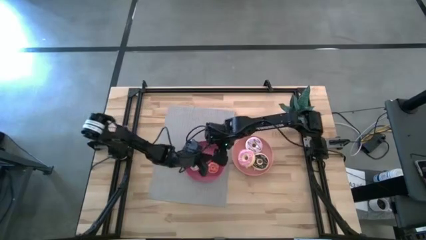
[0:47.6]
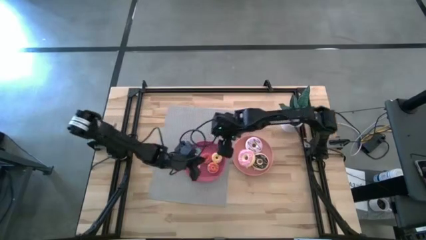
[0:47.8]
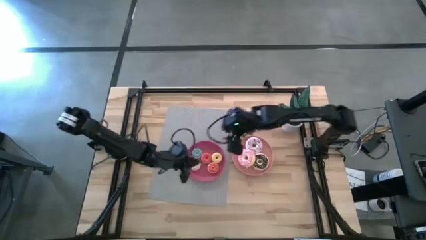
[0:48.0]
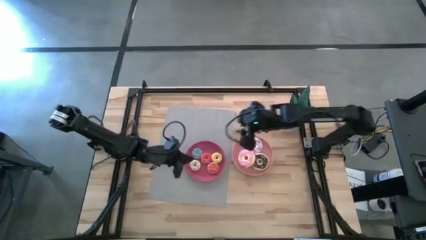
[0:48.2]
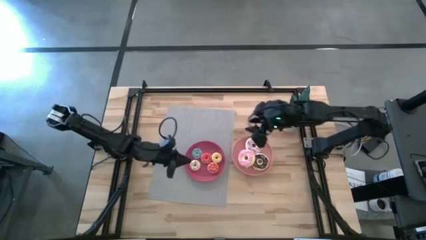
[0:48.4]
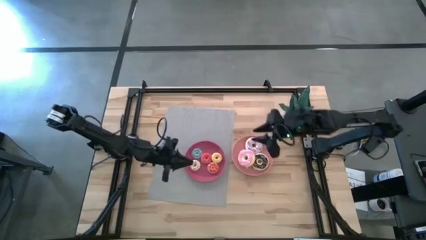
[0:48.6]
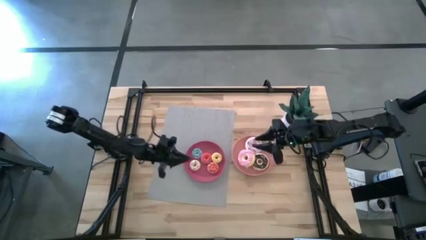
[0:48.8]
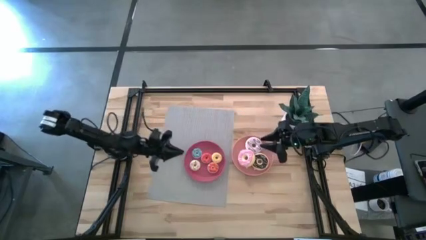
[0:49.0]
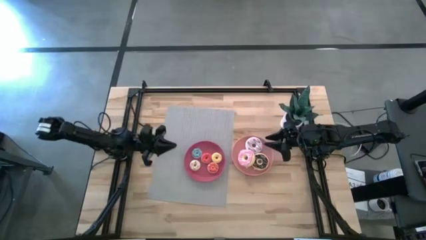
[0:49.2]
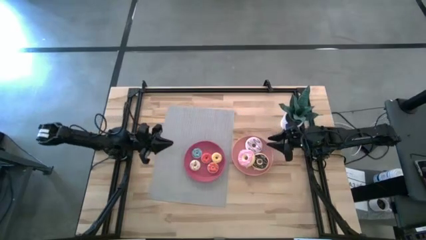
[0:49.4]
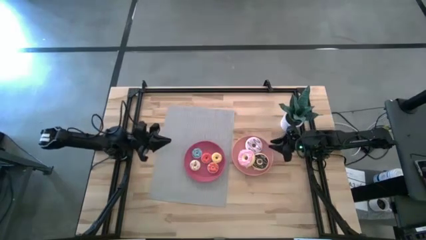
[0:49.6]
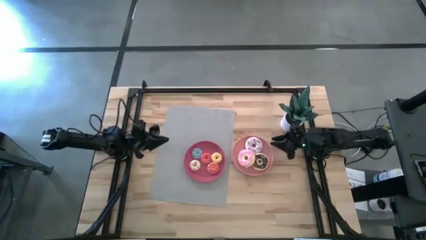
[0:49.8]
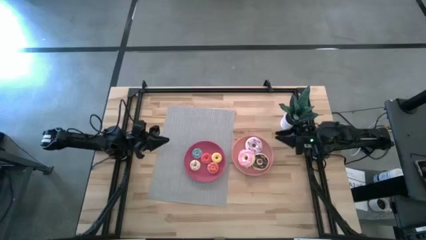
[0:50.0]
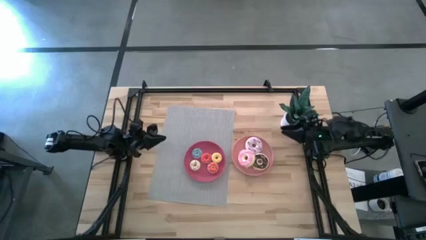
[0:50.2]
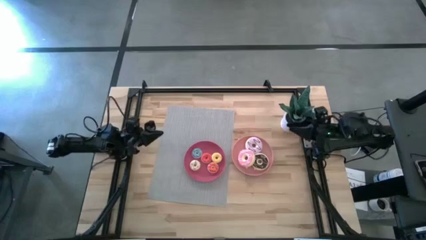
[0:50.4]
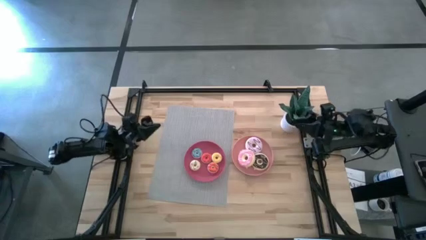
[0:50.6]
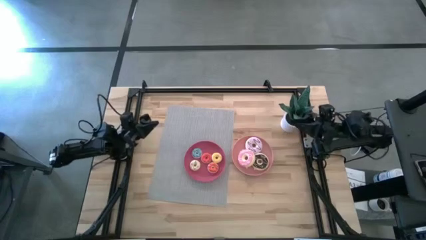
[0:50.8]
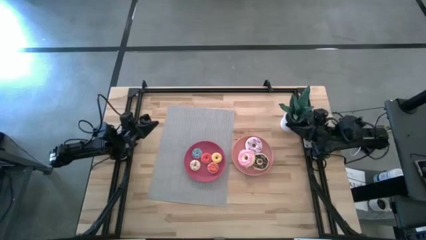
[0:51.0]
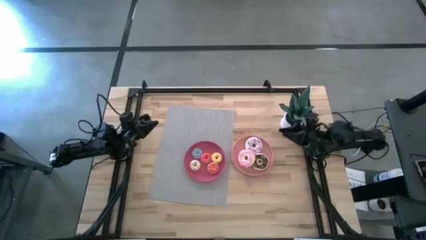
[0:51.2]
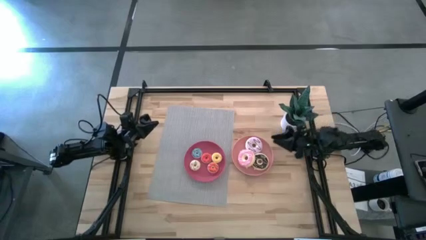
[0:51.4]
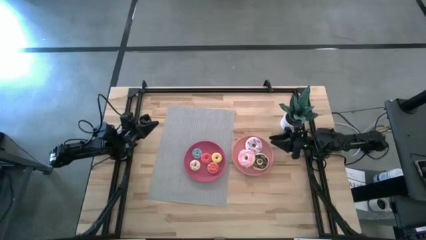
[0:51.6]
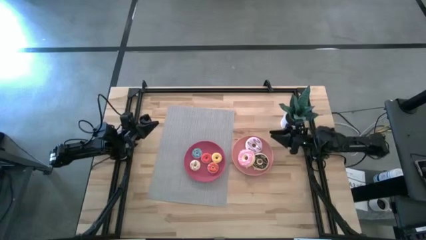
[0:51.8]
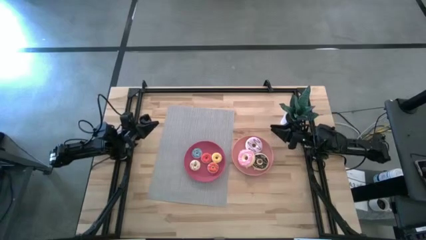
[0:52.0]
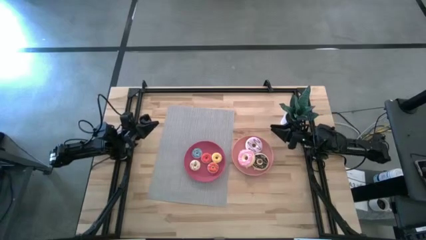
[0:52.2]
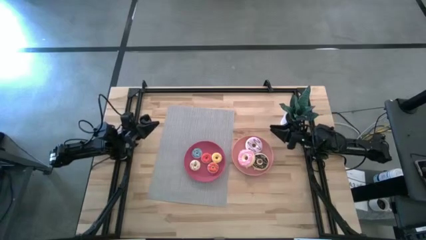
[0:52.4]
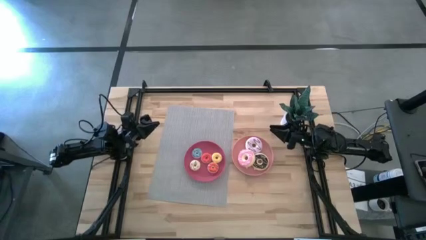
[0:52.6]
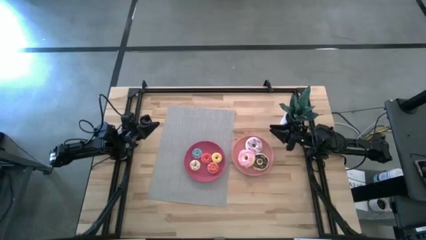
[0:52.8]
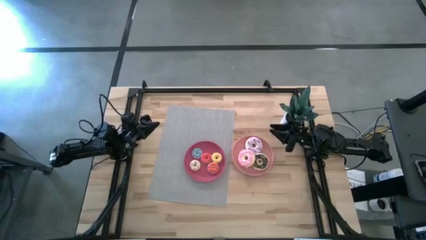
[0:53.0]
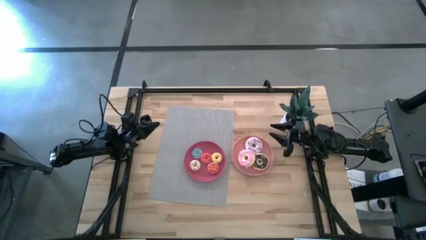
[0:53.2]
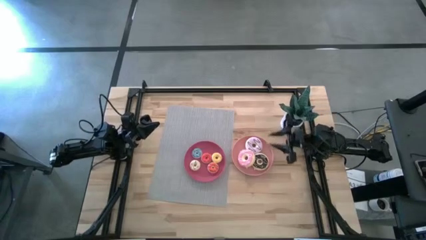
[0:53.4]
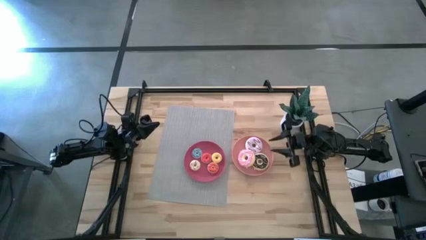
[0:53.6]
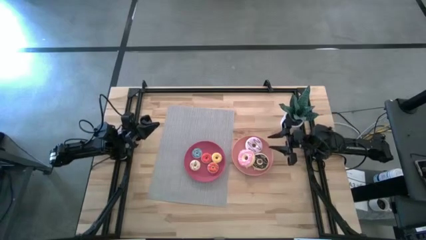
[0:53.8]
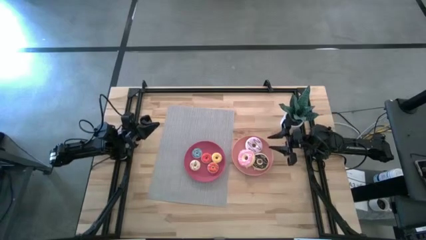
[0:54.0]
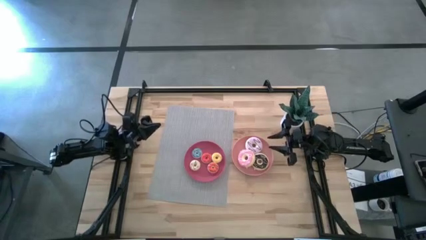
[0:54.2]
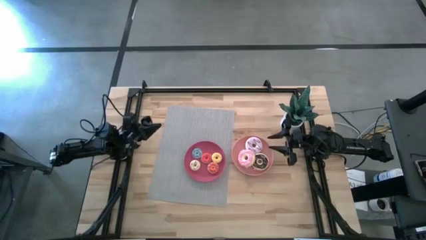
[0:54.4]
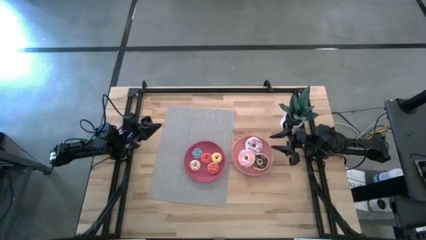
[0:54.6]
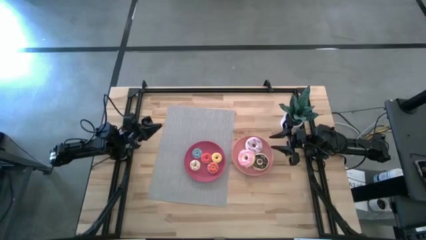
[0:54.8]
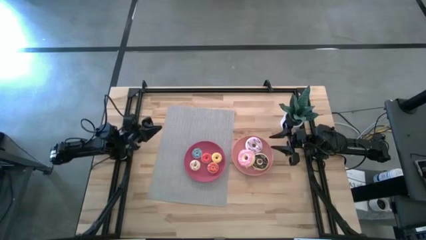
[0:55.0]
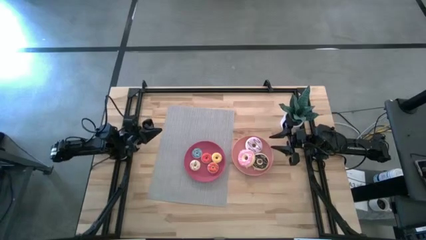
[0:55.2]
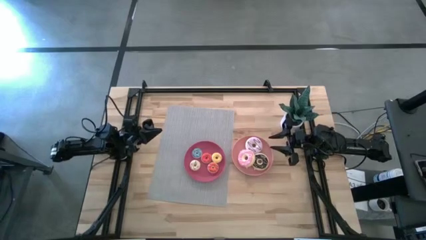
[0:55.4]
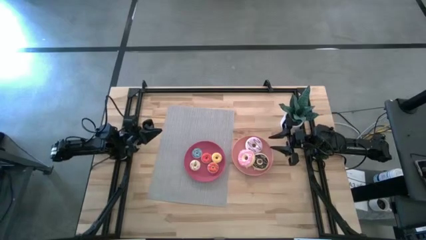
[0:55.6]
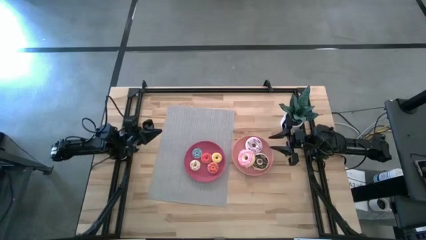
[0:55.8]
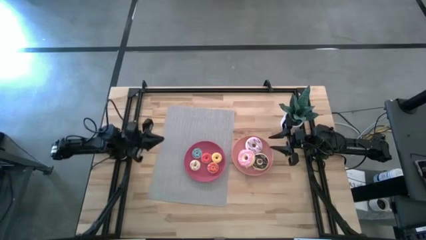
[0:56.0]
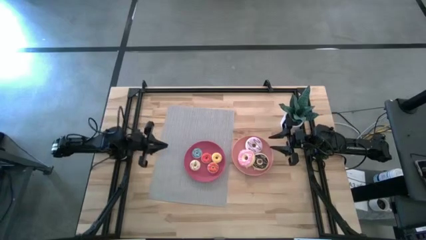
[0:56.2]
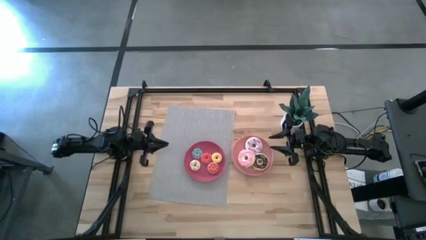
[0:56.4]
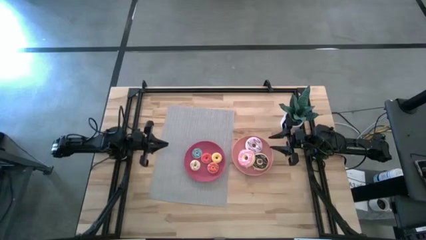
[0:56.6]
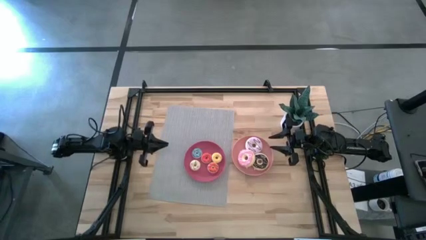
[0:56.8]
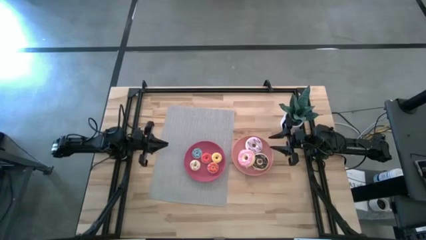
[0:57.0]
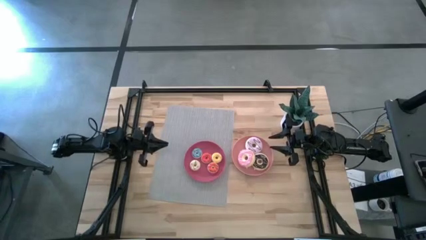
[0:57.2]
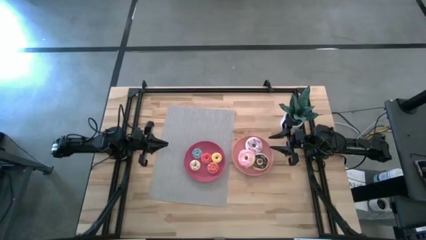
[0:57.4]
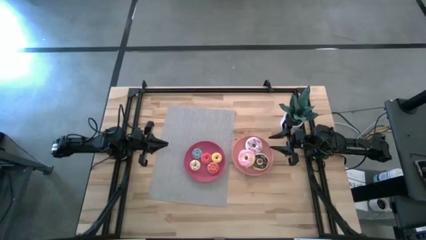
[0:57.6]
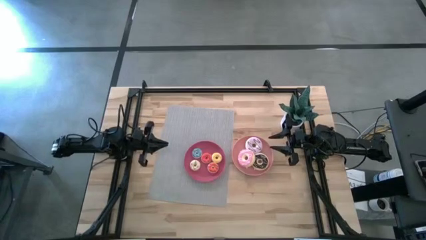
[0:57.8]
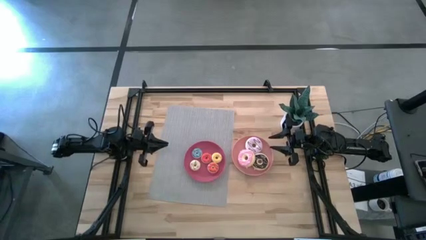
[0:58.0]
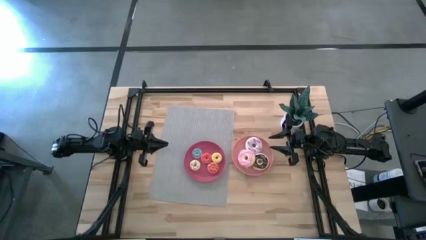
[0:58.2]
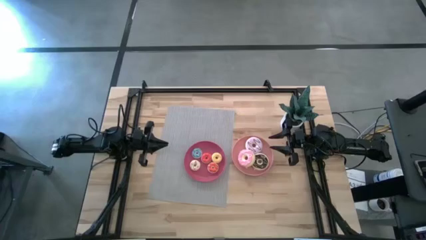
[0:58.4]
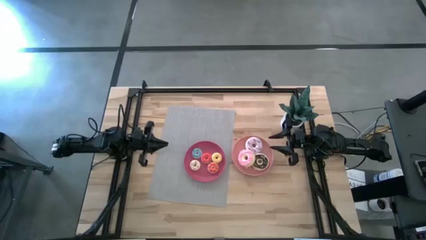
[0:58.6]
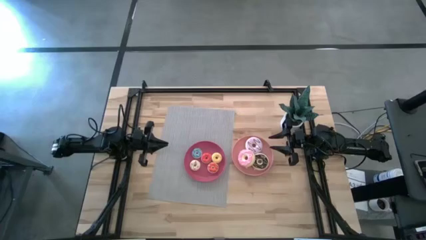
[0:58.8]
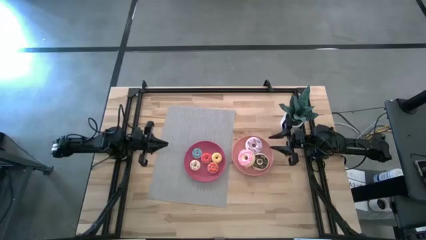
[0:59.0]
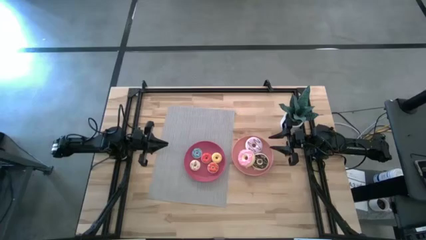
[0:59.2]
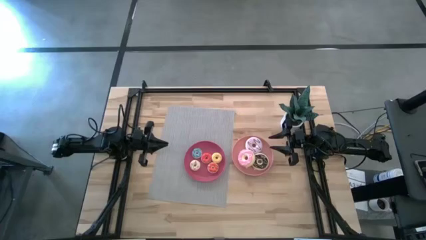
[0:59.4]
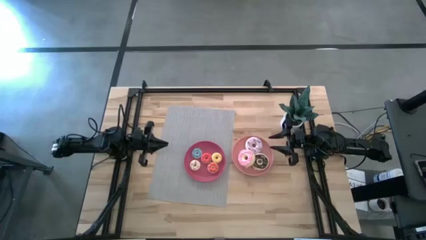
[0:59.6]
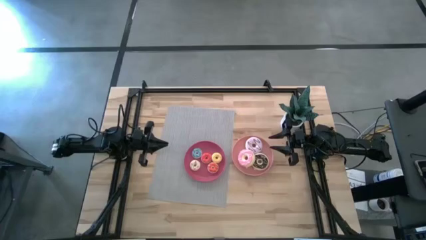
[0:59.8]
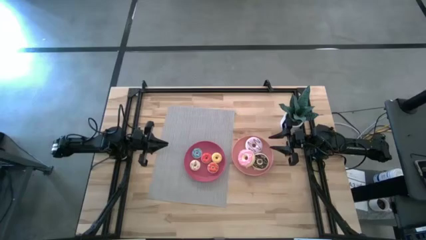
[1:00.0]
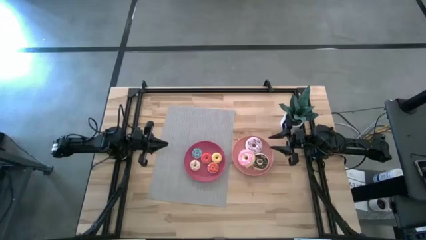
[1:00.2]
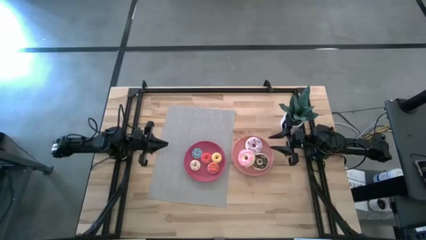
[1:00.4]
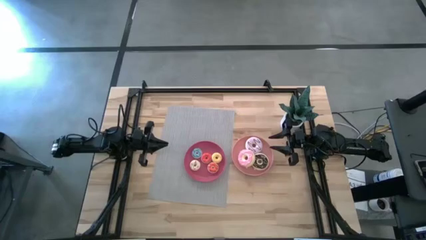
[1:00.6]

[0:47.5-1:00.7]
Task: Pick & Place donuts
Return to Home Position
